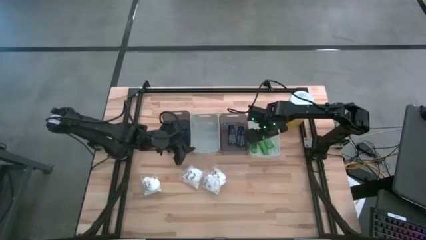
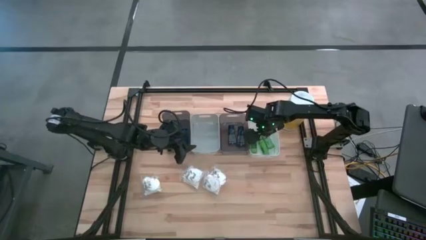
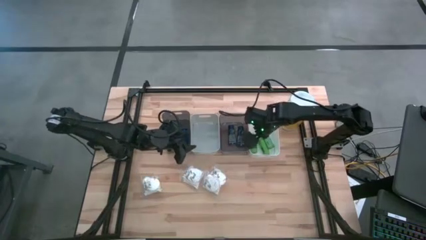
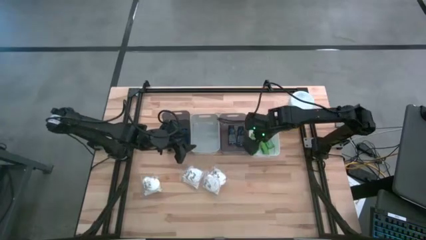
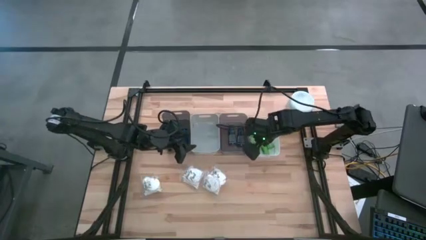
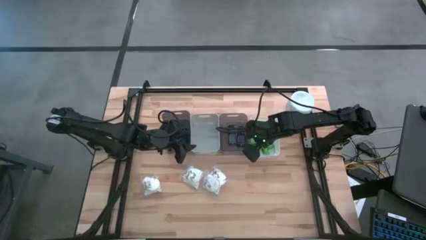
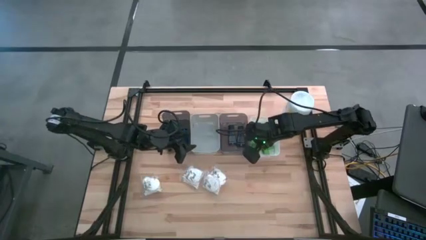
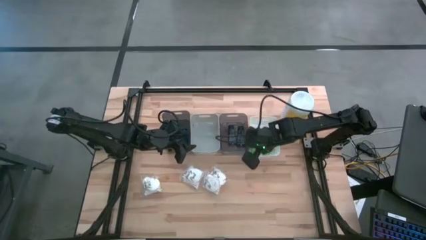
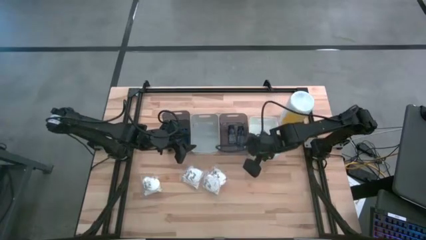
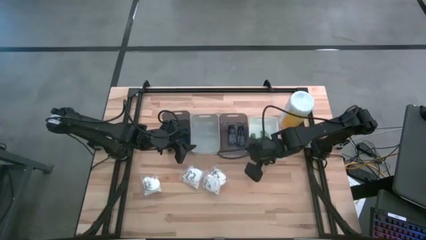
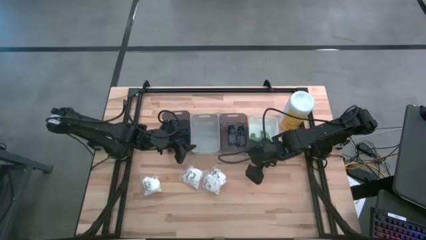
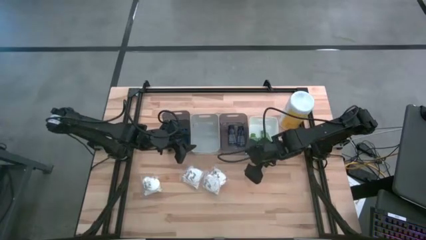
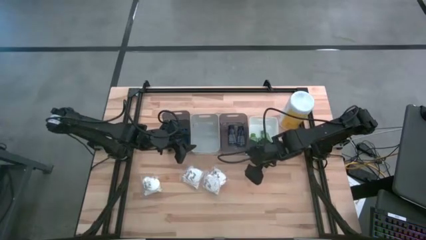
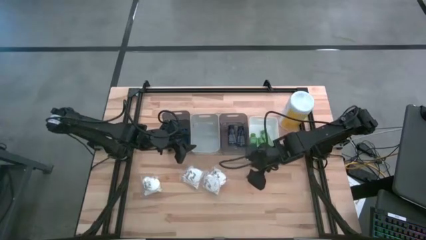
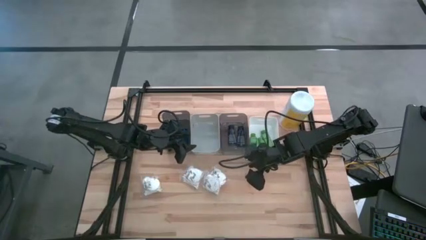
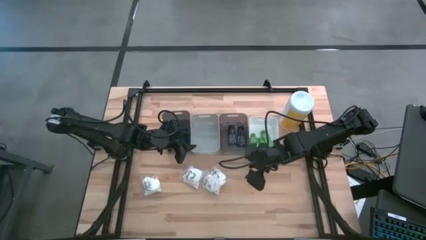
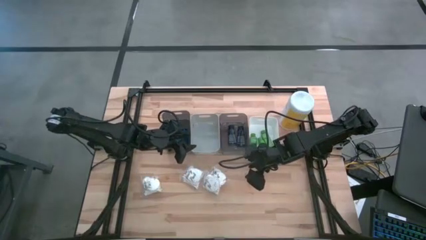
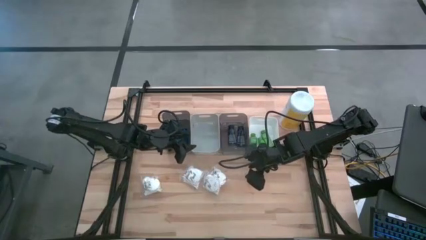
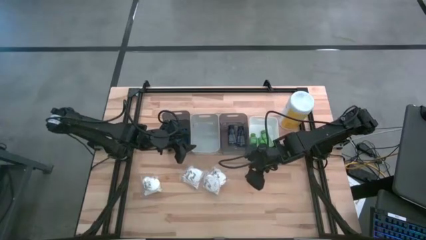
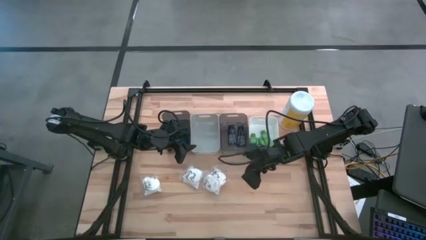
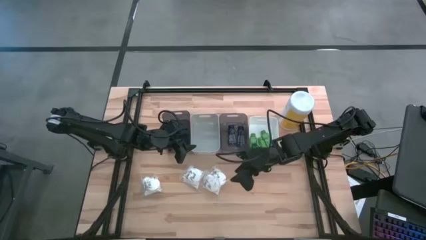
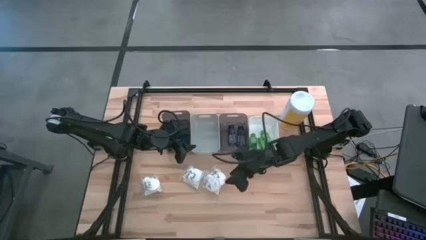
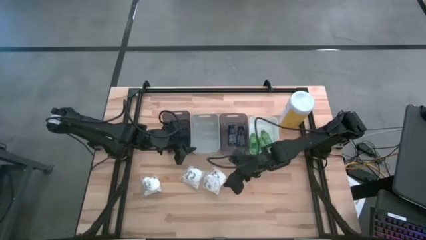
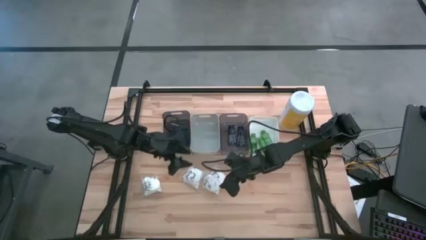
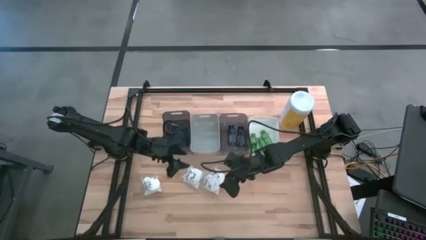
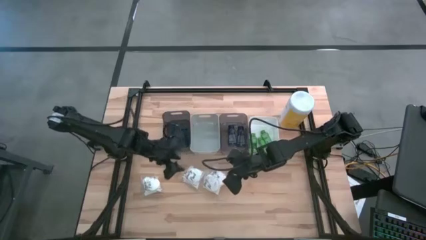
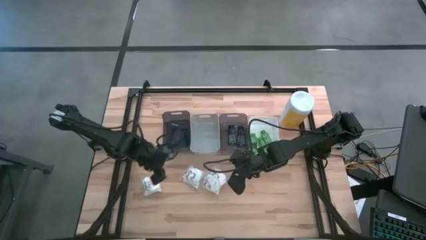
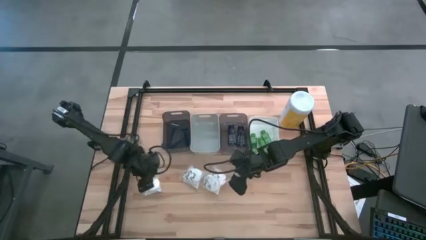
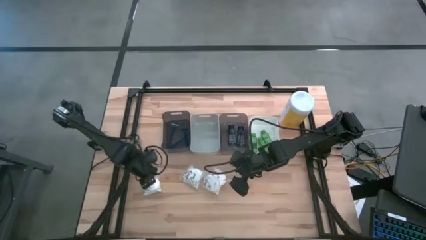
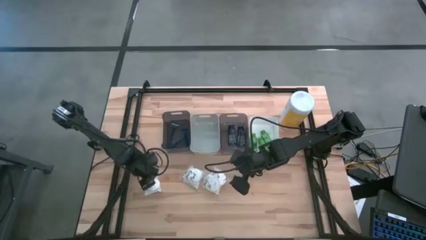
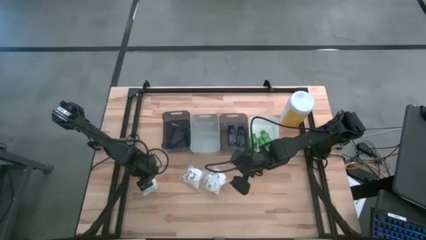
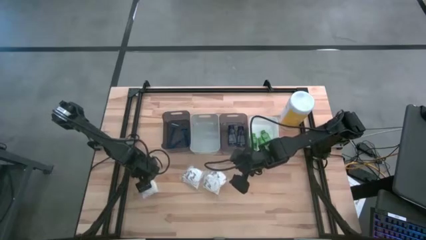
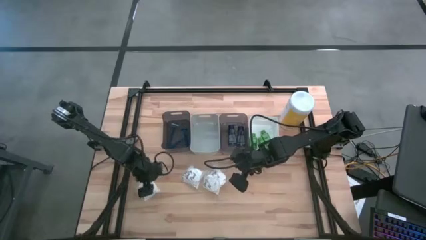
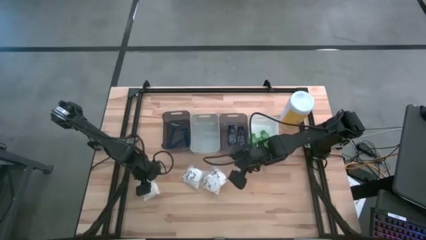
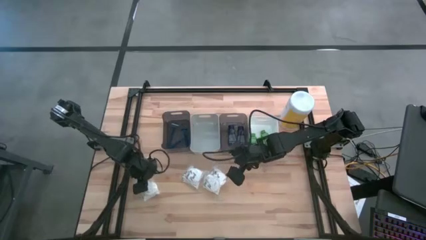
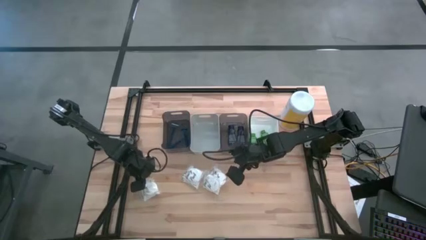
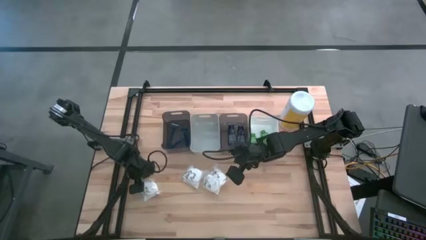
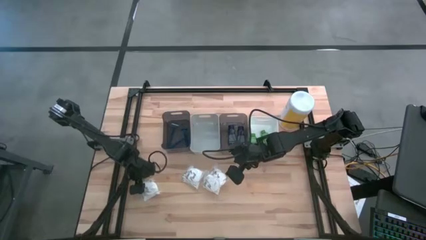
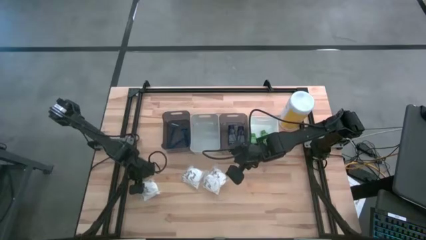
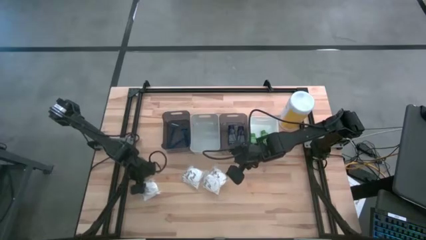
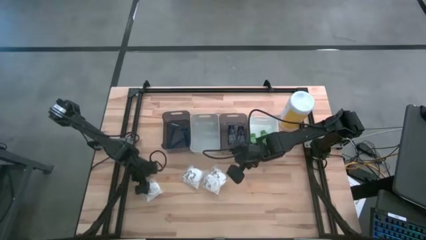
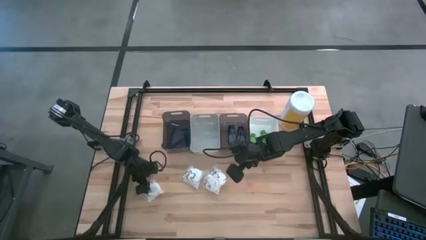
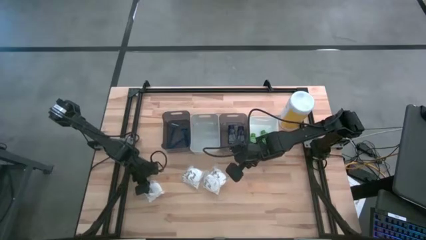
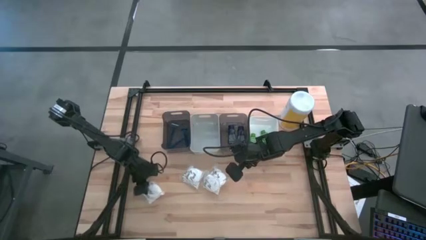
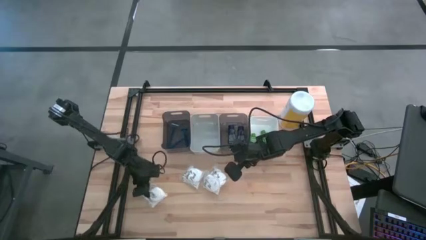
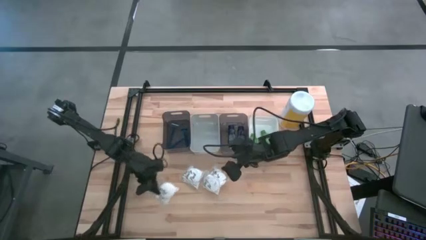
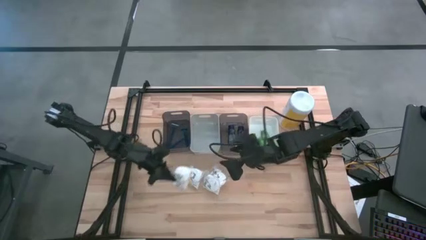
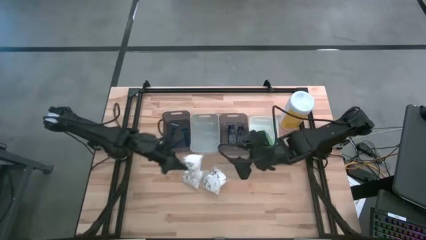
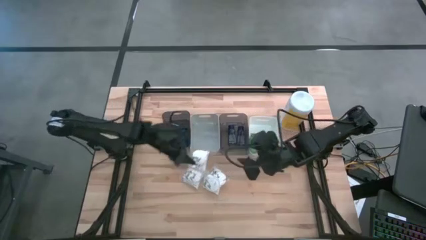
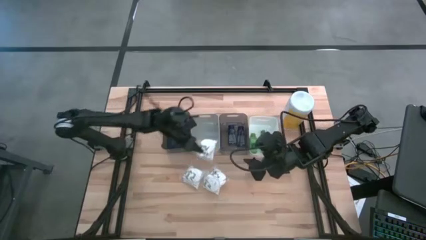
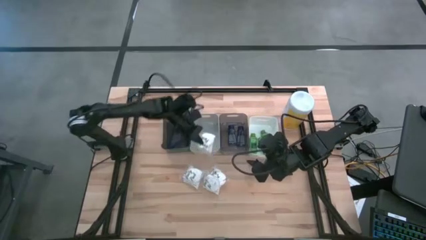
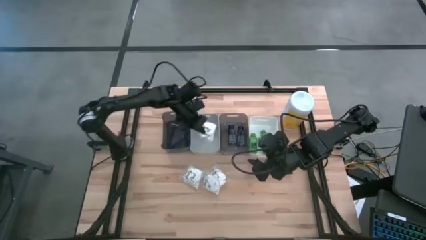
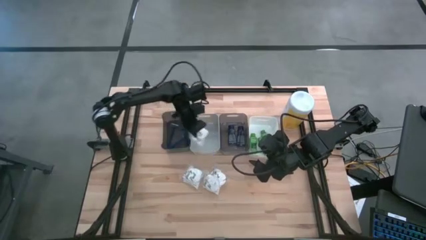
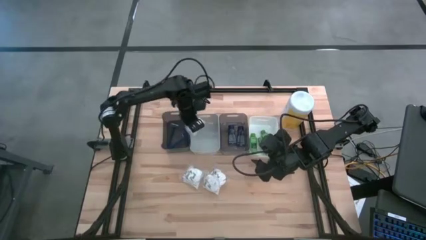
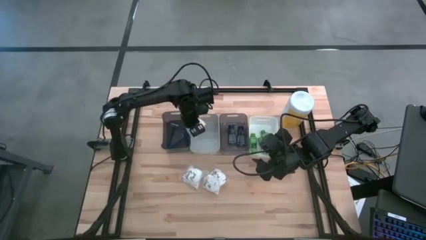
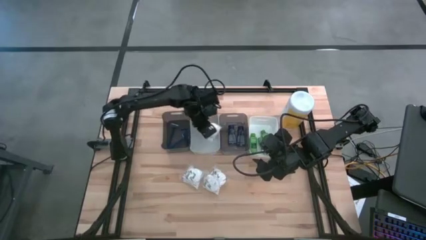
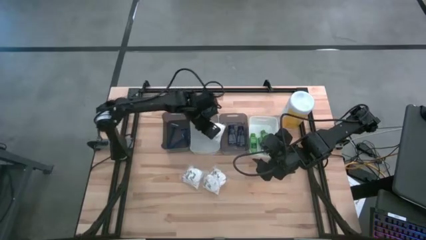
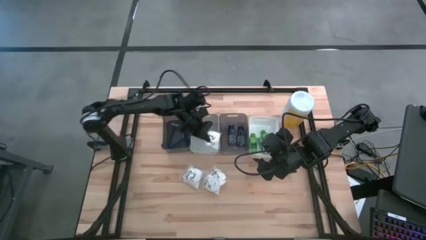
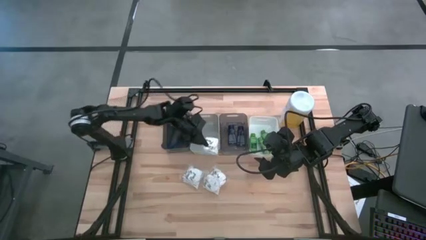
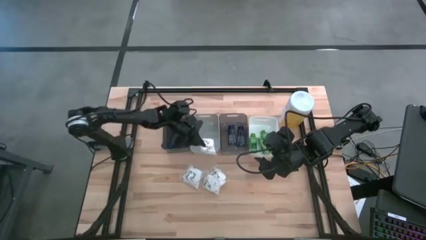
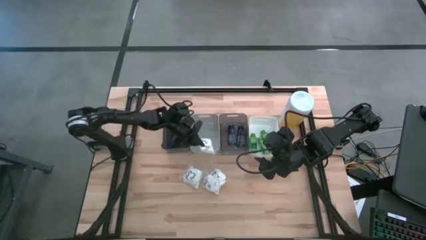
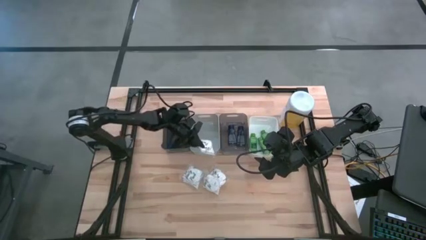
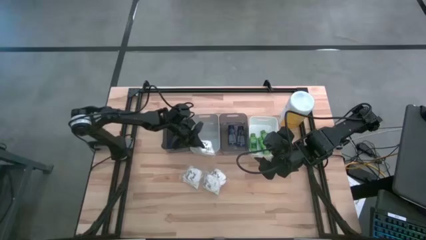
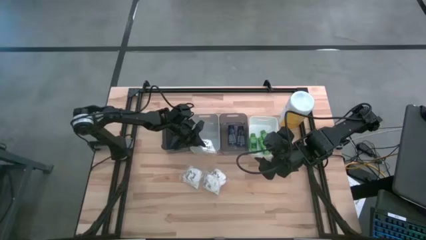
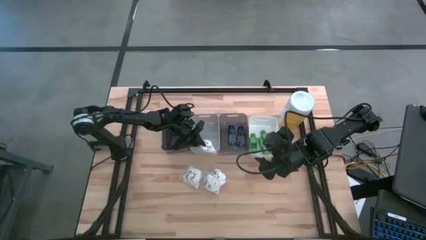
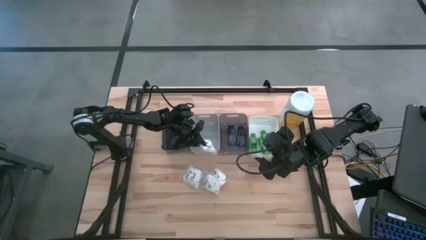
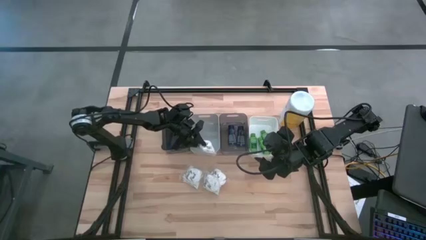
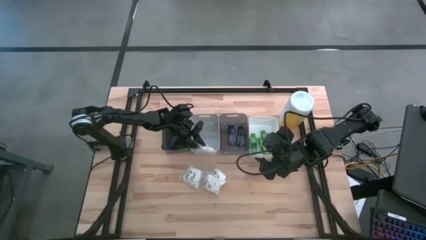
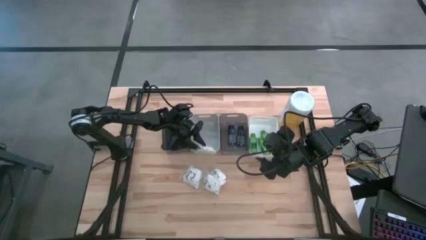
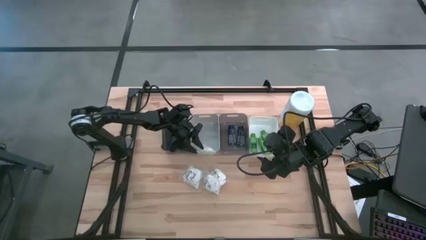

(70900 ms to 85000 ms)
Task: Pick & Place Travel size toiletries
Put the white cotton pack into the gray bin

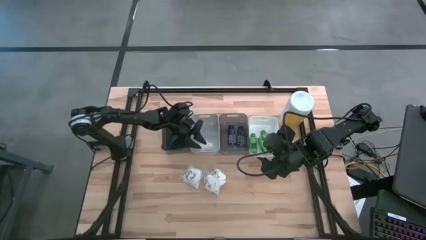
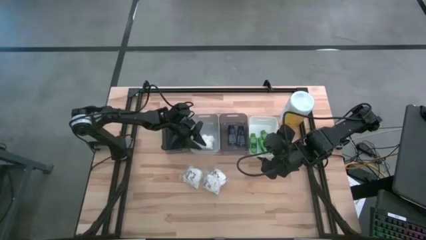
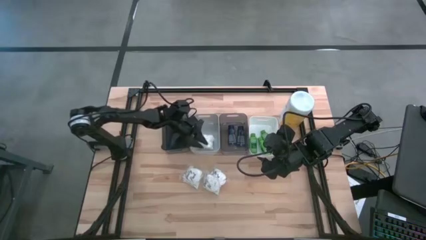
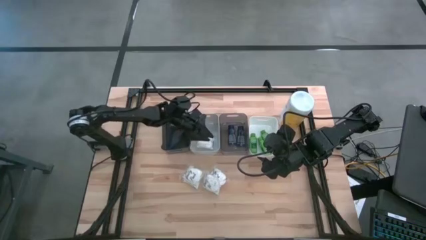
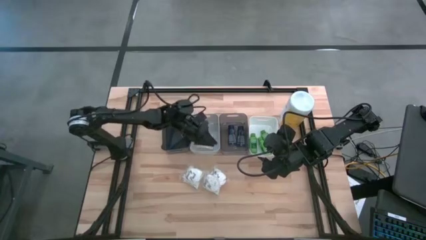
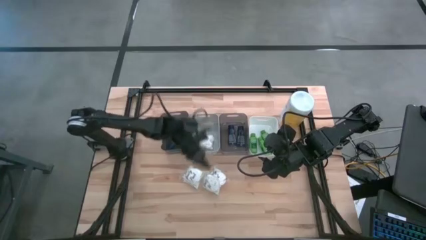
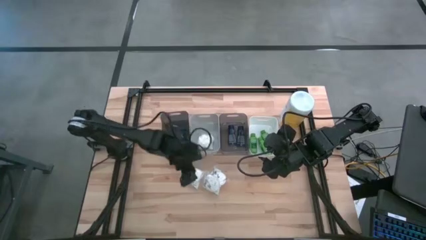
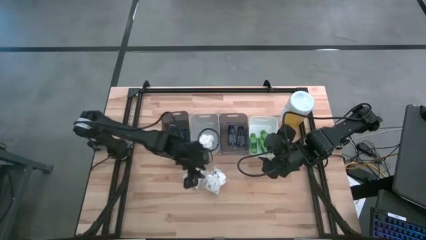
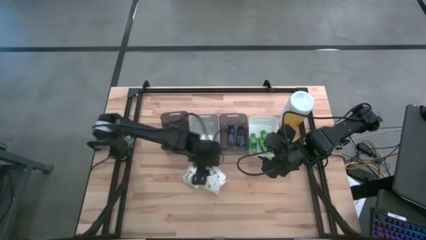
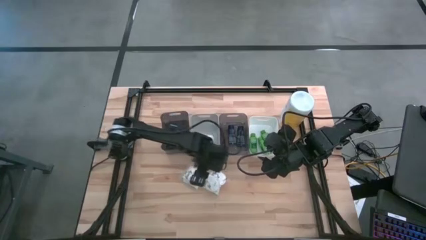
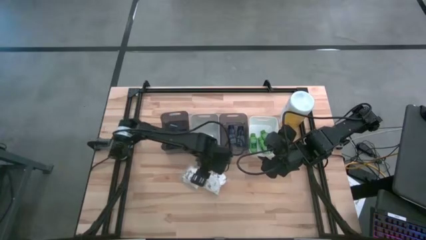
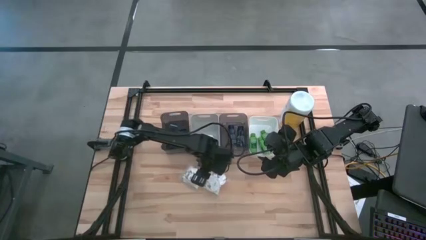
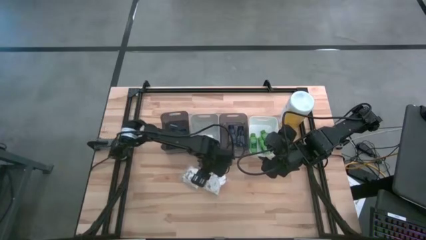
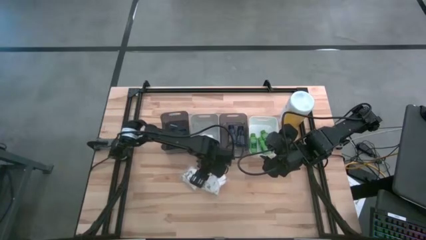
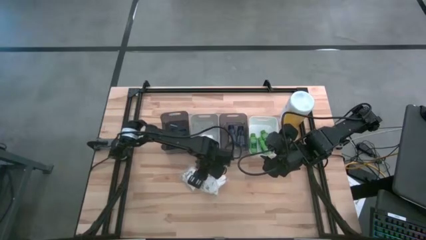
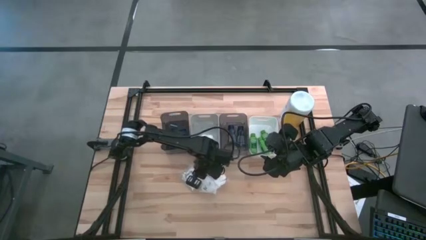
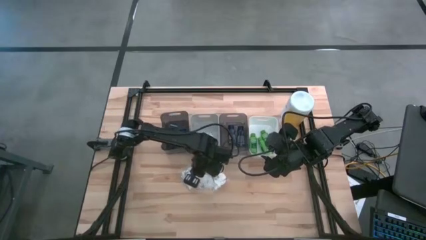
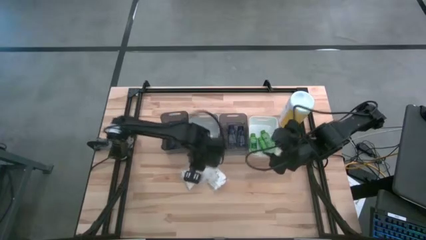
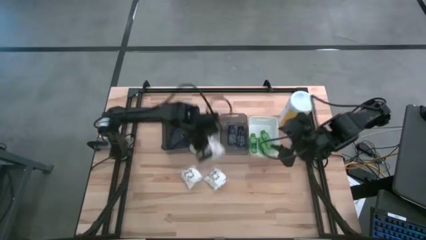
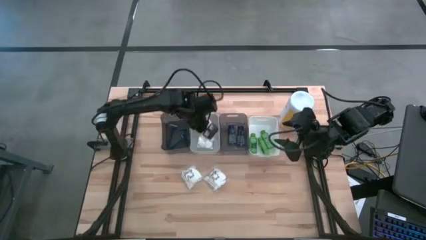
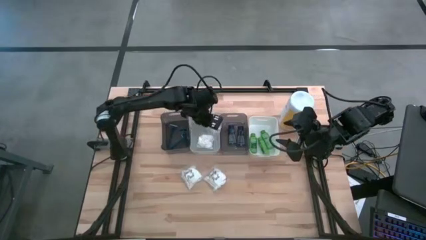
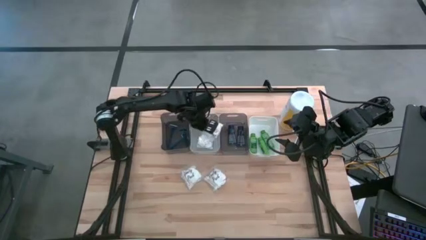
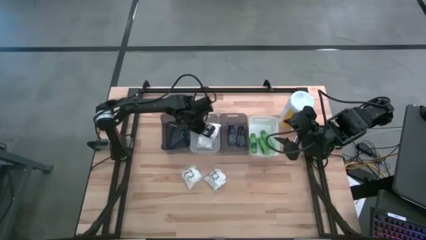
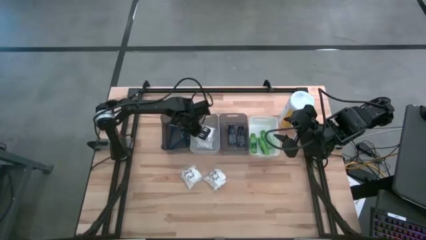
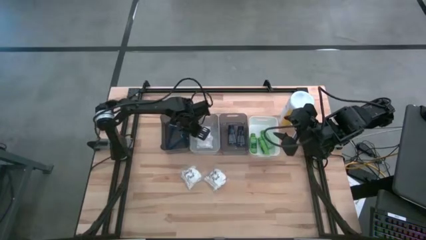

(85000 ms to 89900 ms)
Put the white cotton pack into the gray bin
